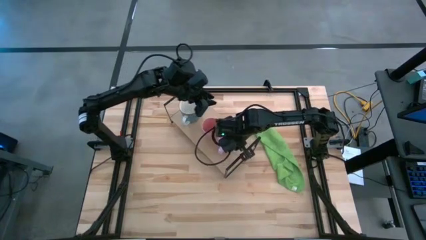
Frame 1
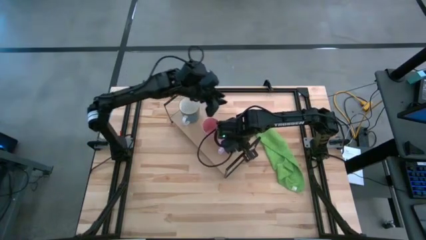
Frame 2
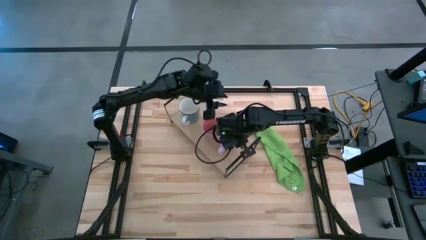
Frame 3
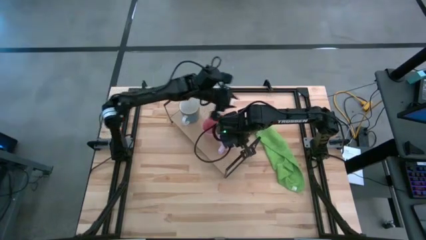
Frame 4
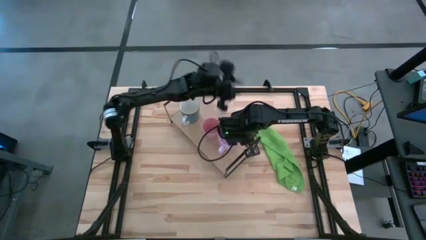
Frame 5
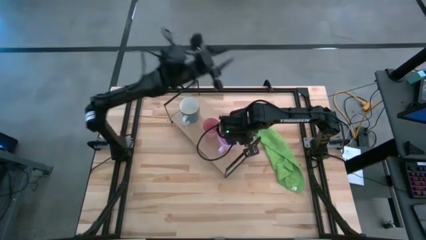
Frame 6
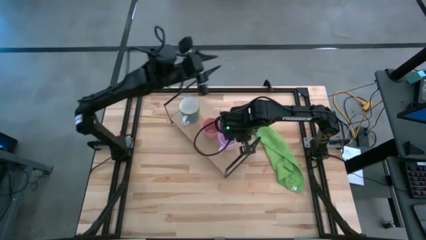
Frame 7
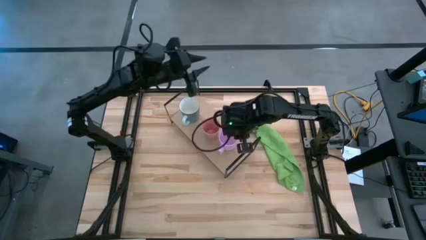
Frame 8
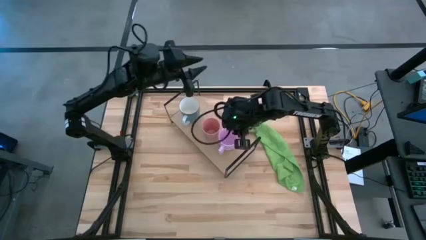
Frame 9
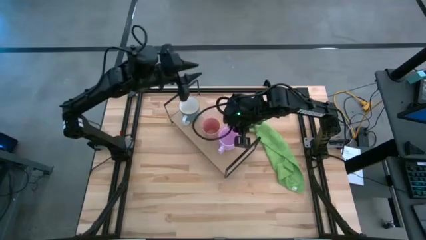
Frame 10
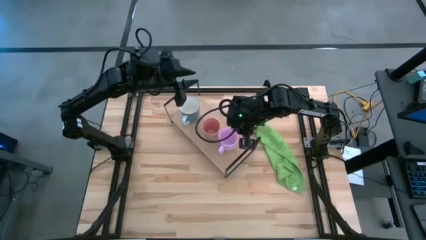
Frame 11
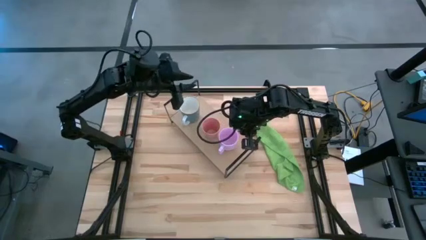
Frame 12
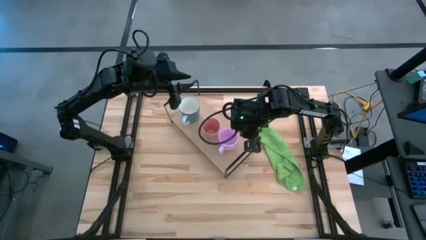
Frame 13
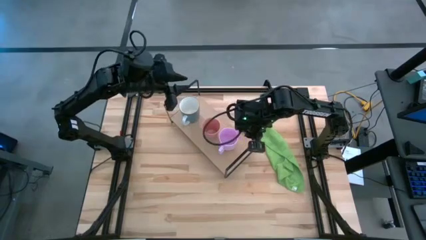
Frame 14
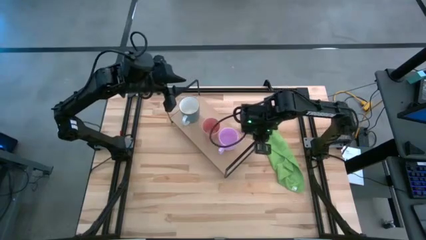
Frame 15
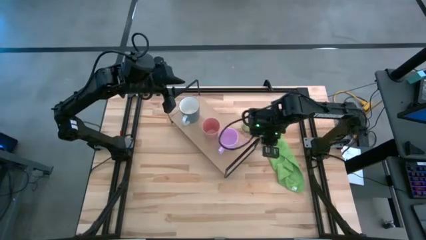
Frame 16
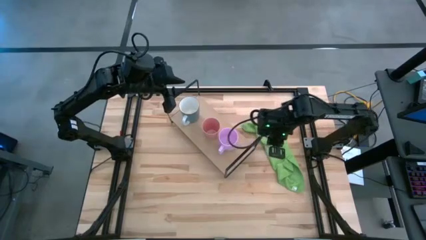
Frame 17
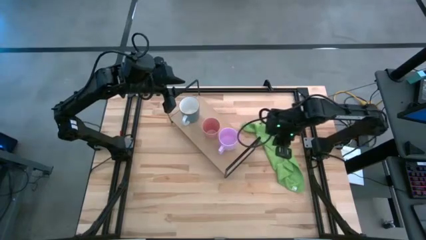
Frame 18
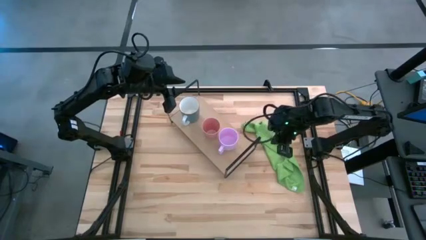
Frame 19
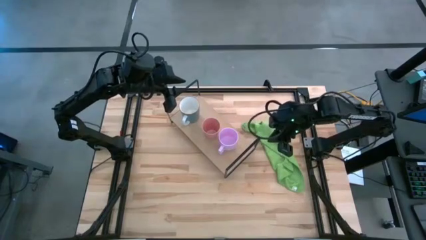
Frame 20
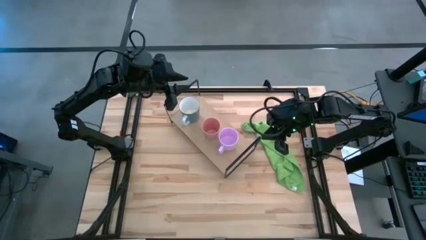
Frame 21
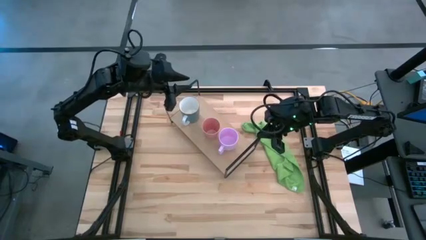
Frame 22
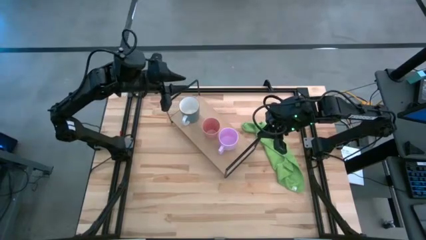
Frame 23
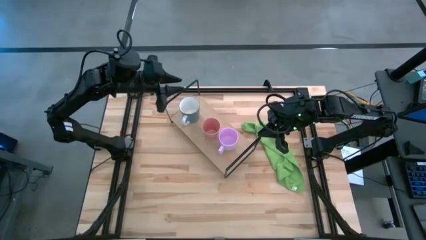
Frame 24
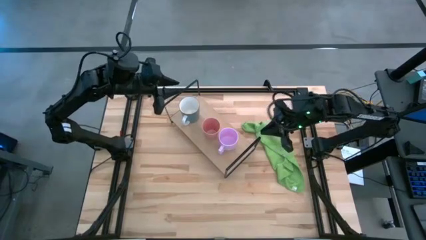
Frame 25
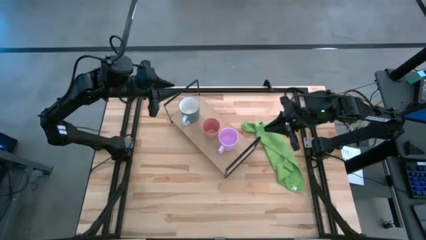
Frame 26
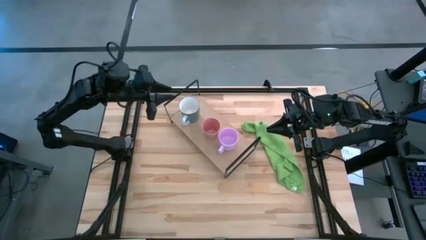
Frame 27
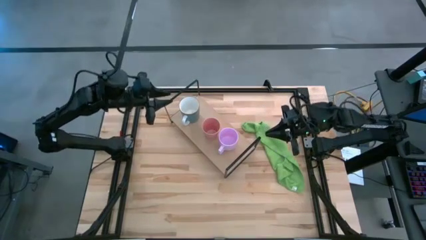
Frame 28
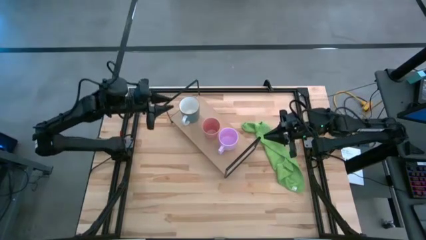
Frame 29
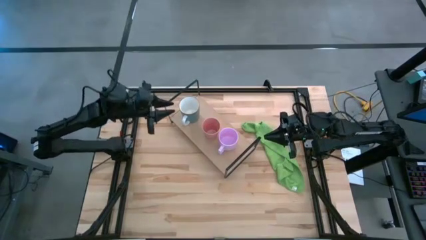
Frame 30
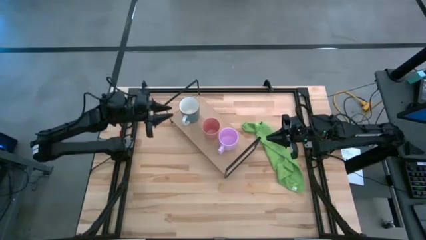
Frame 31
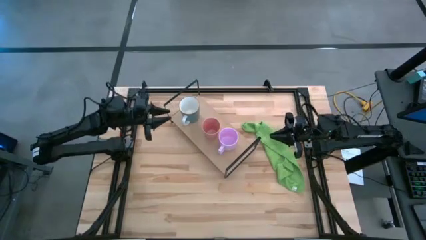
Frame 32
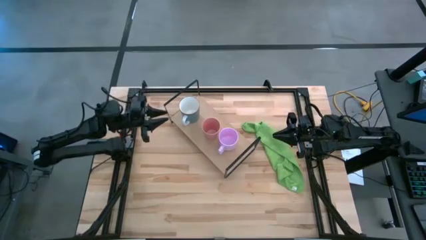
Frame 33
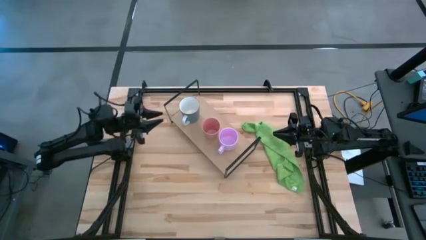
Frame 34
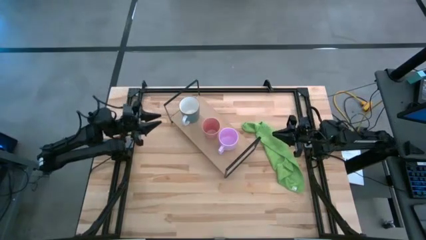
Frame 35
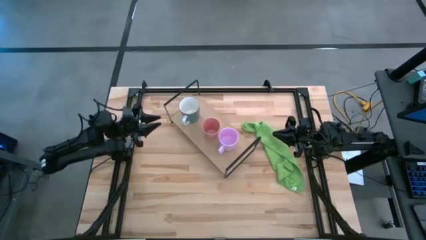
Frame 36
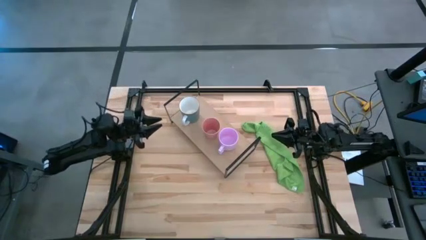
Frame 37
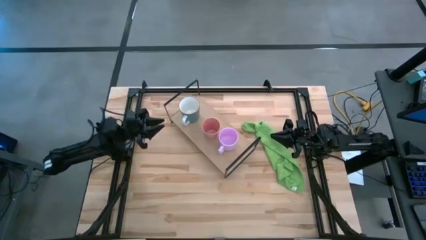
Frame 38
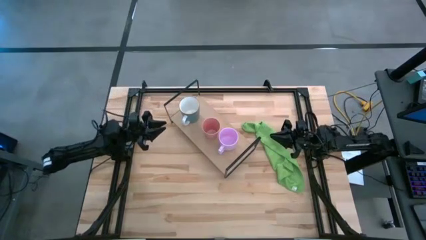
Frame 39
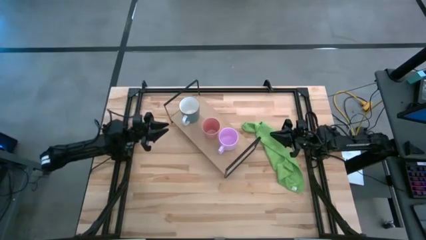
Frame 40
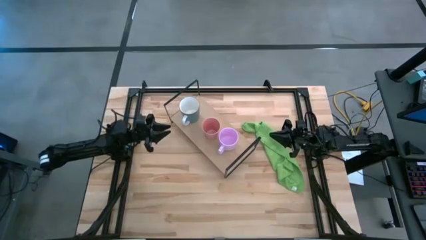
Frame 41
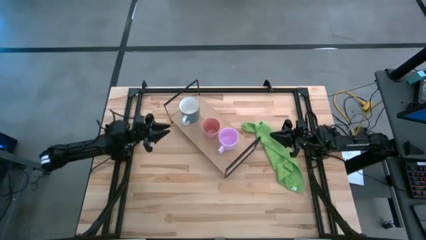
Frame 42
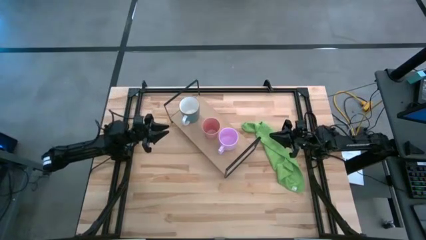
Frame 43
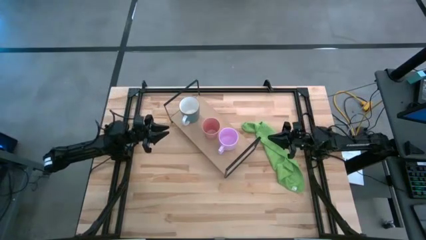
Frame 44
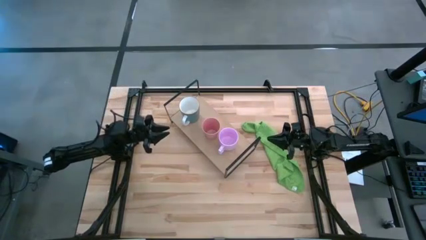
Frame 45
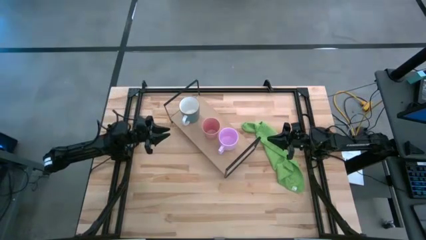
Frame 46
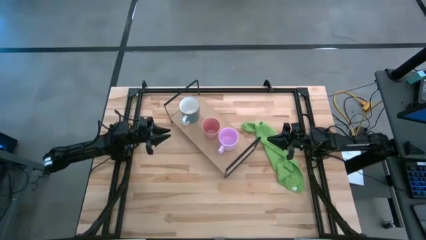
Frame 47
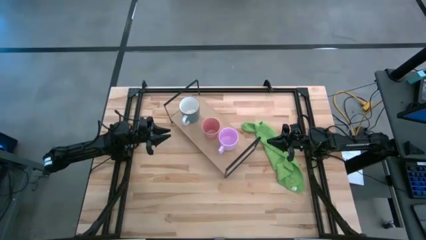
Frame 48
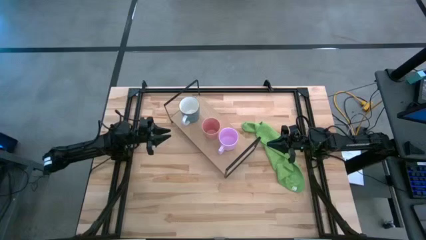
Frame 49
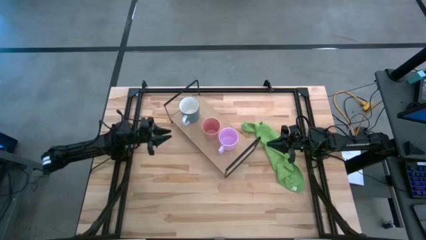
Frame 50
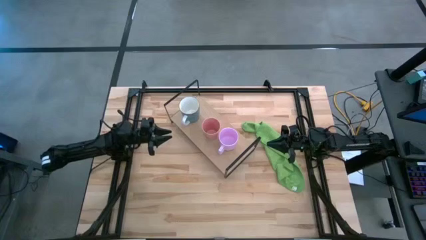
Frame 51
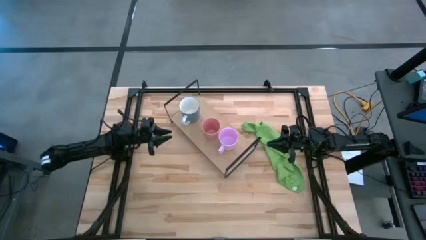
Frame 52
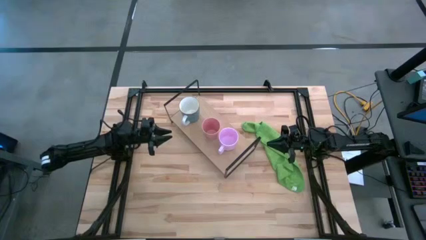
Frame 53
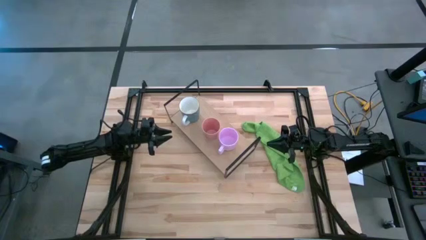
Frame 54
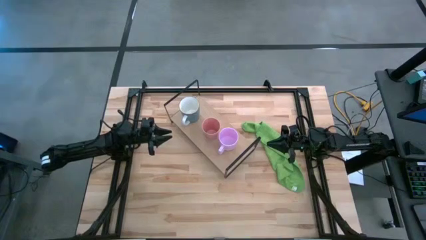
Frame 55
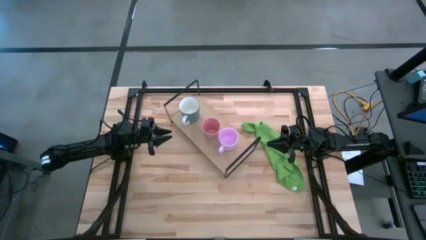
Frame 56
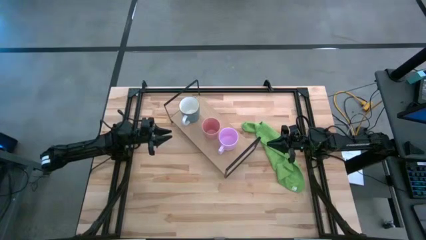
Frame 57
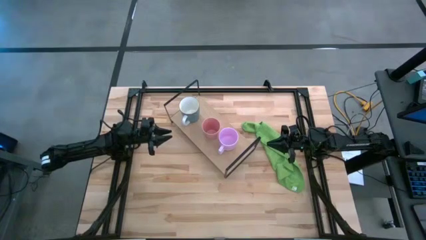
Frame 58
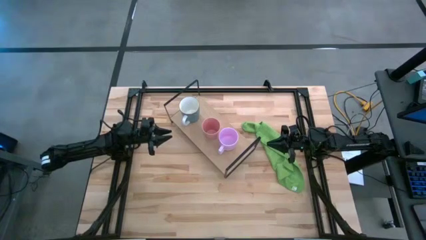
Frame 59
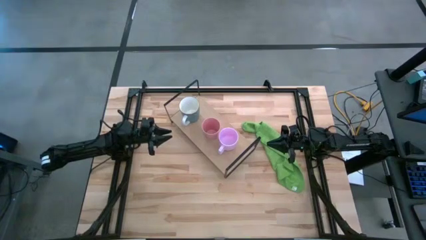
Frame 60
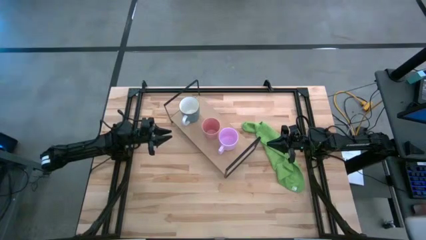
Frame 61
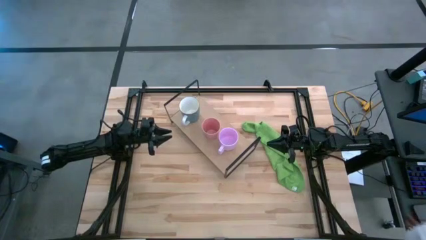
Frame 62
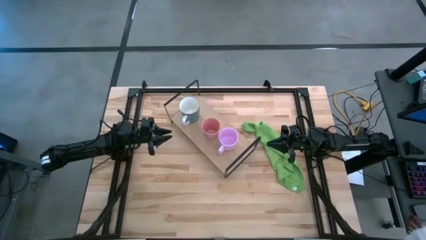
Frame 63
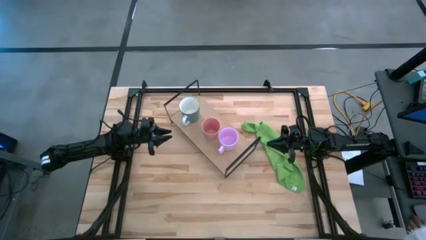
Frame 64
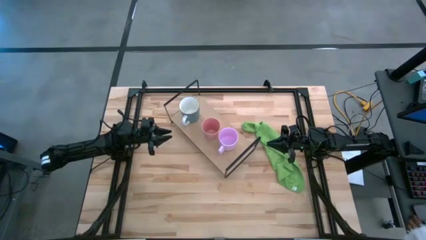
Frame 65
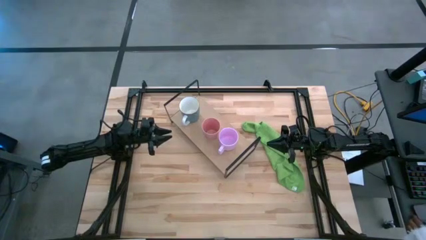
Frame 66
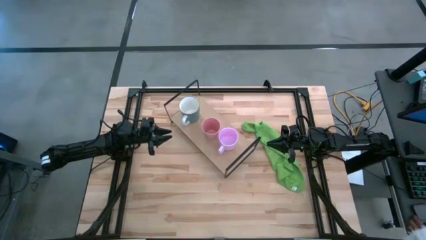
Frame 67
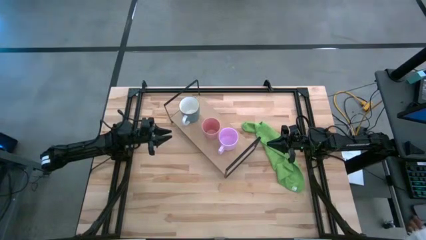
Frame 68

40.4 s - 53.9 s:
Task: Stack small to large cups/mugs on shelf
Return to Home Position
